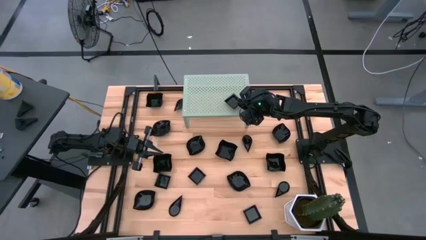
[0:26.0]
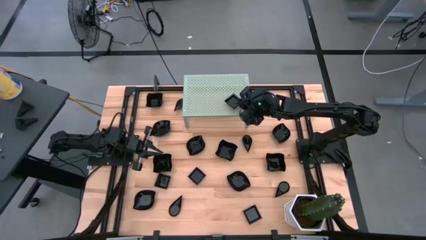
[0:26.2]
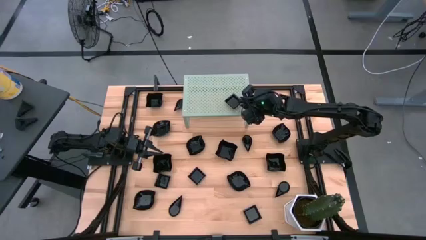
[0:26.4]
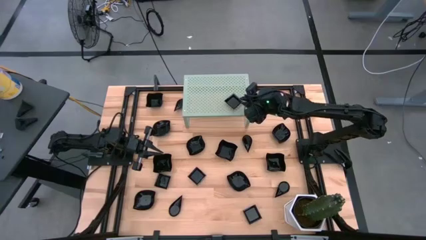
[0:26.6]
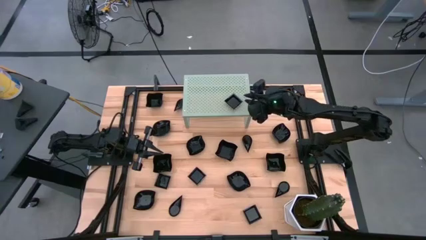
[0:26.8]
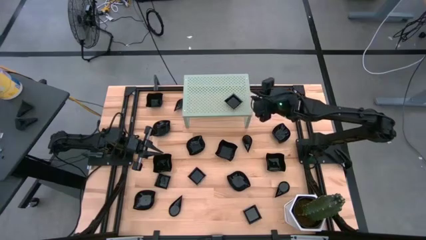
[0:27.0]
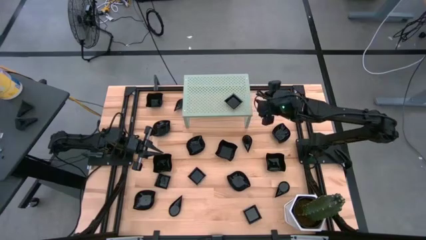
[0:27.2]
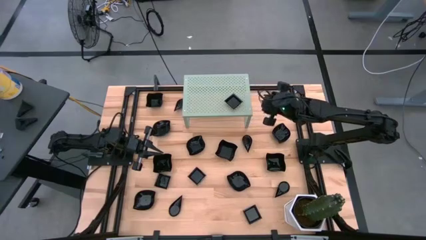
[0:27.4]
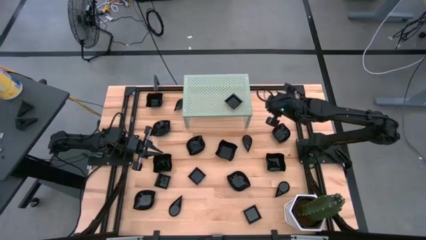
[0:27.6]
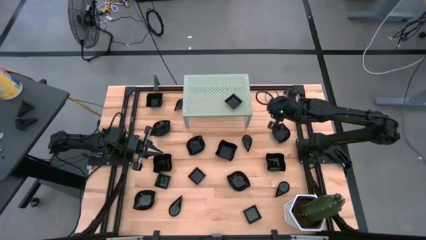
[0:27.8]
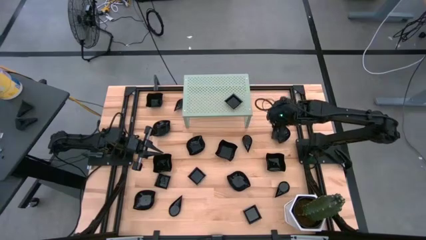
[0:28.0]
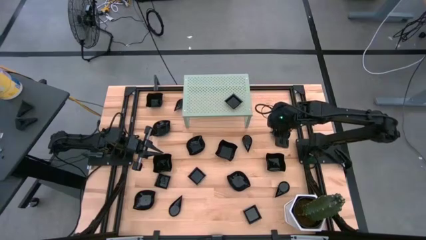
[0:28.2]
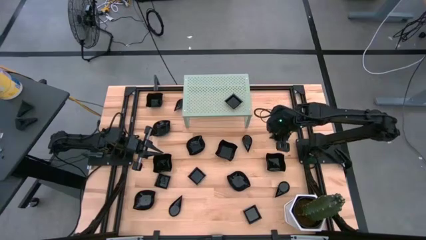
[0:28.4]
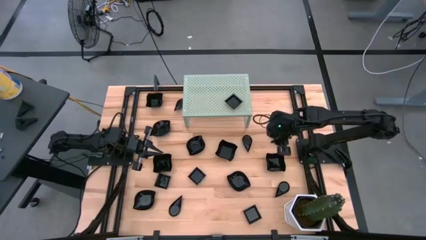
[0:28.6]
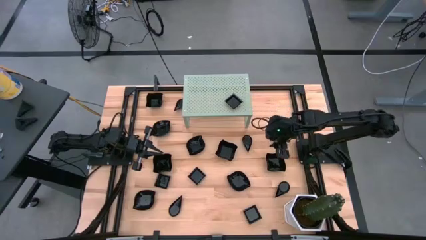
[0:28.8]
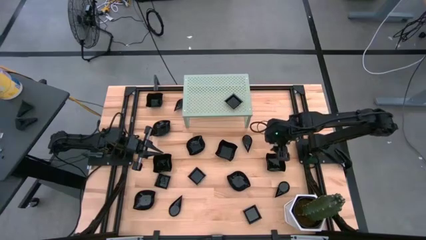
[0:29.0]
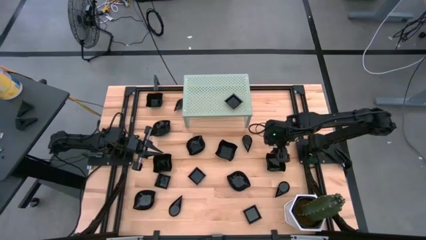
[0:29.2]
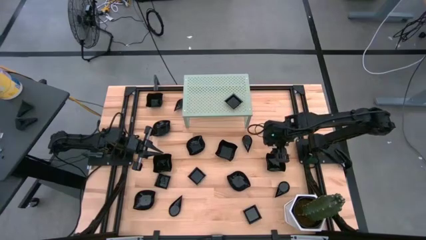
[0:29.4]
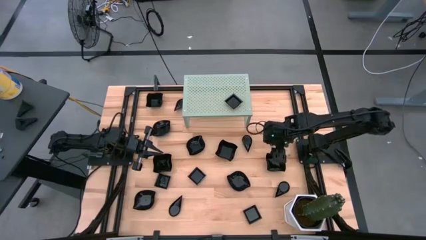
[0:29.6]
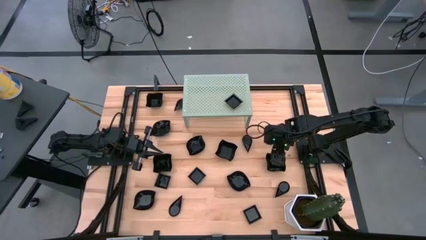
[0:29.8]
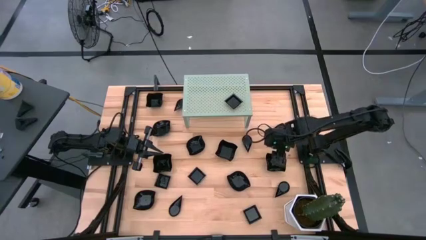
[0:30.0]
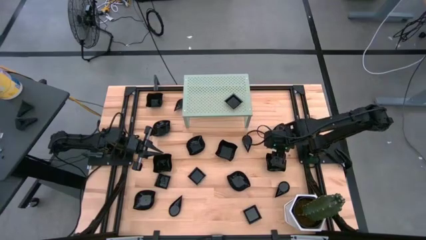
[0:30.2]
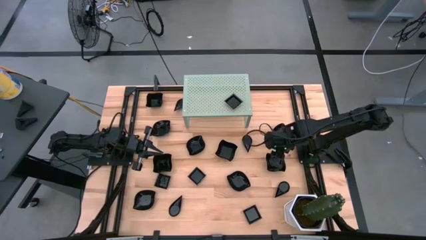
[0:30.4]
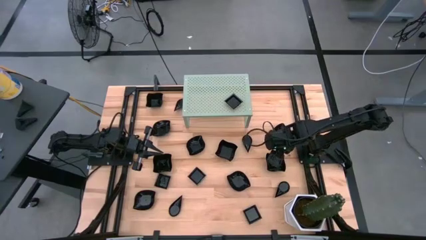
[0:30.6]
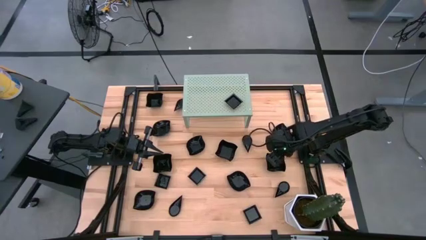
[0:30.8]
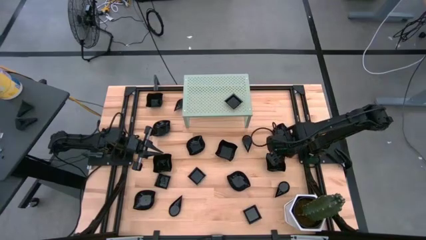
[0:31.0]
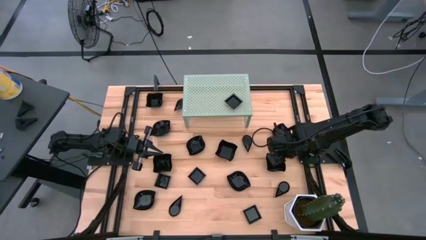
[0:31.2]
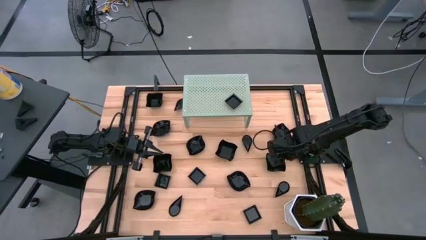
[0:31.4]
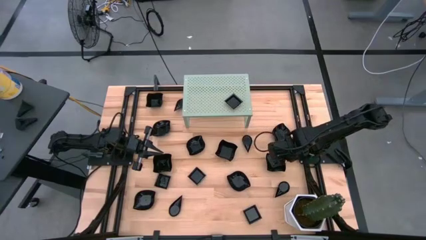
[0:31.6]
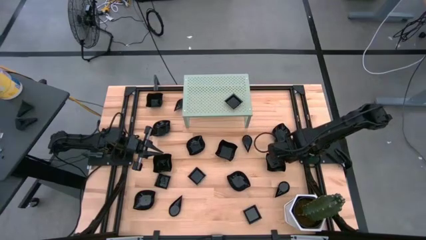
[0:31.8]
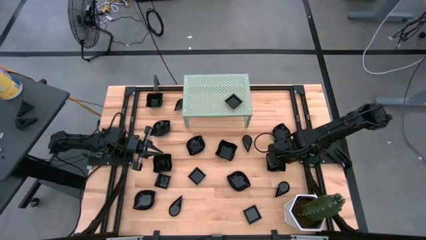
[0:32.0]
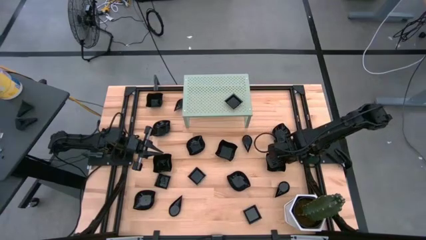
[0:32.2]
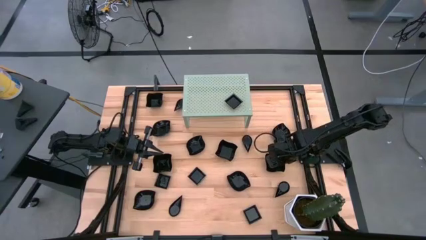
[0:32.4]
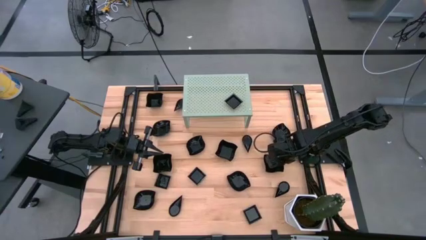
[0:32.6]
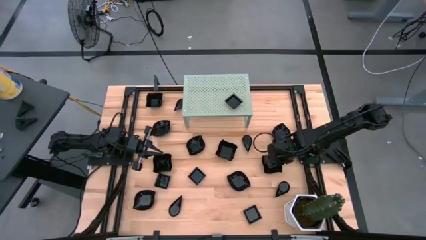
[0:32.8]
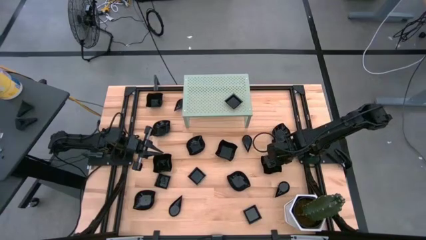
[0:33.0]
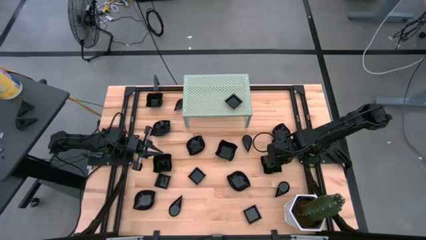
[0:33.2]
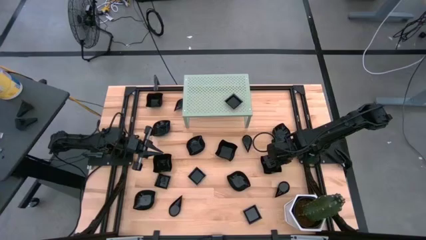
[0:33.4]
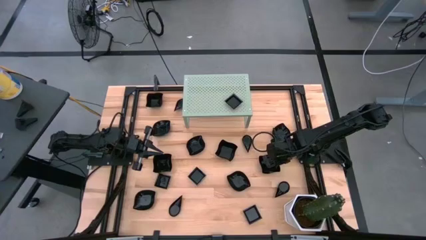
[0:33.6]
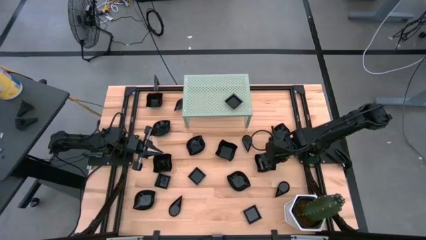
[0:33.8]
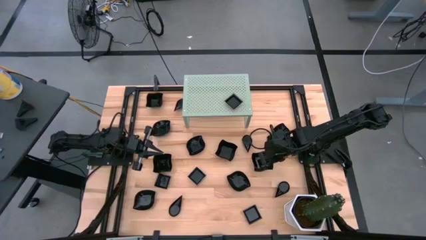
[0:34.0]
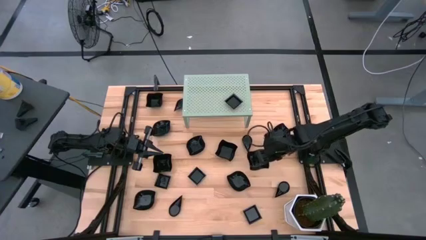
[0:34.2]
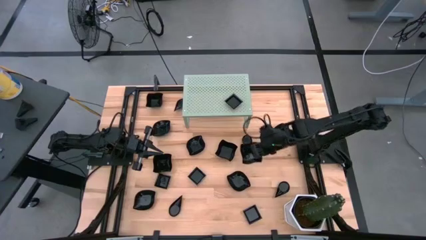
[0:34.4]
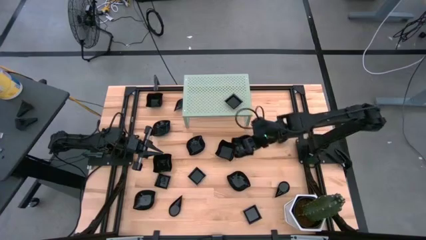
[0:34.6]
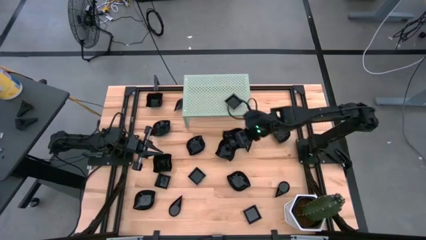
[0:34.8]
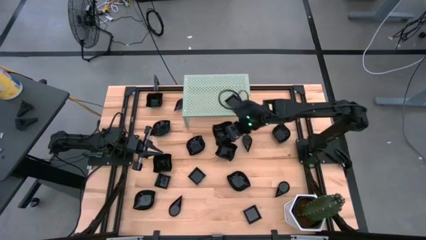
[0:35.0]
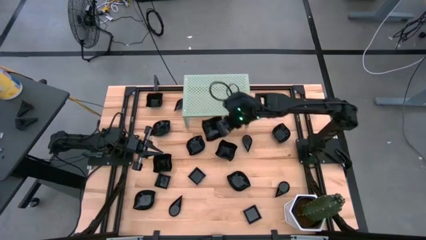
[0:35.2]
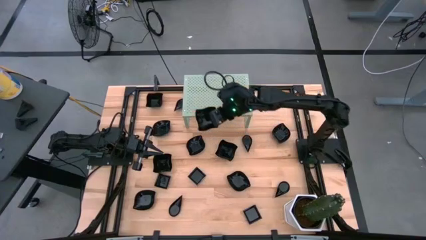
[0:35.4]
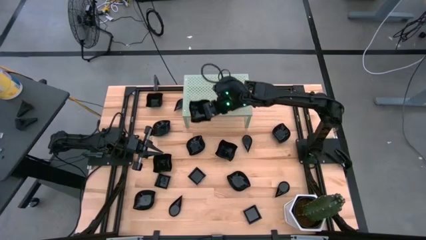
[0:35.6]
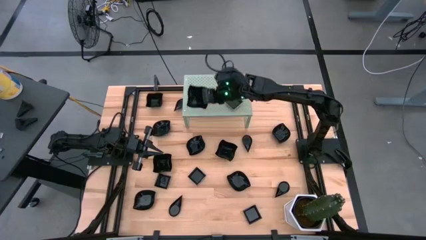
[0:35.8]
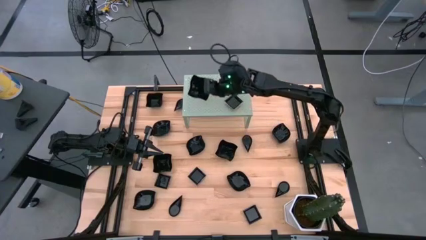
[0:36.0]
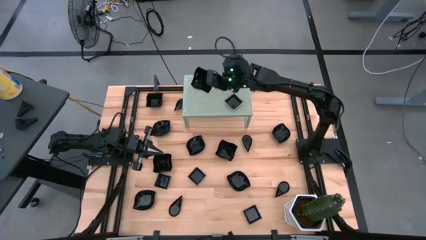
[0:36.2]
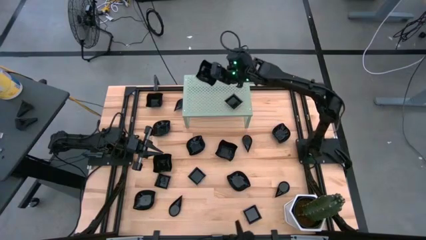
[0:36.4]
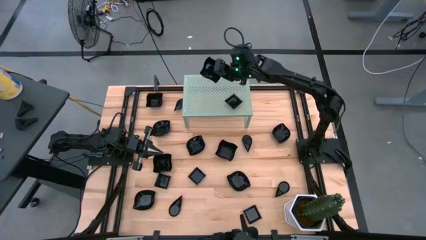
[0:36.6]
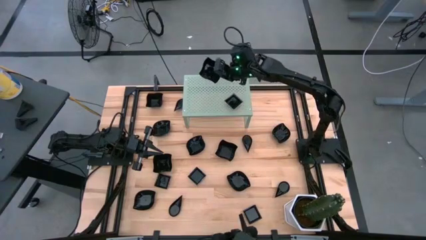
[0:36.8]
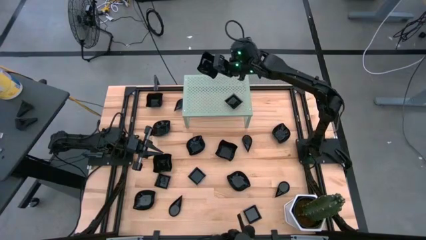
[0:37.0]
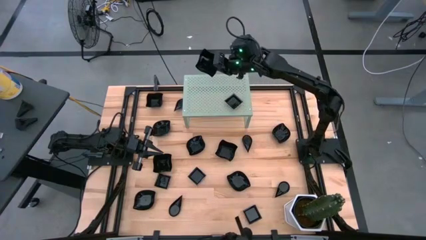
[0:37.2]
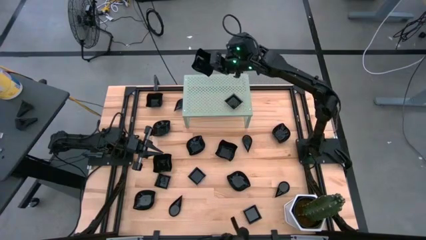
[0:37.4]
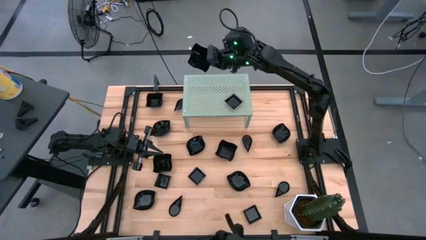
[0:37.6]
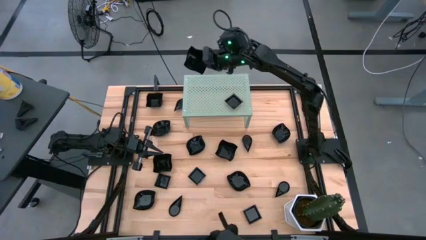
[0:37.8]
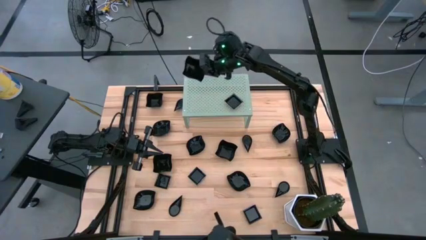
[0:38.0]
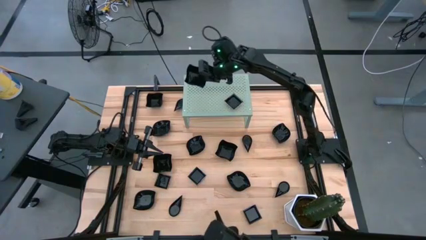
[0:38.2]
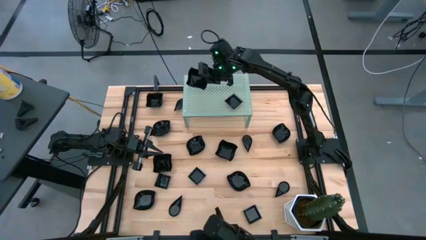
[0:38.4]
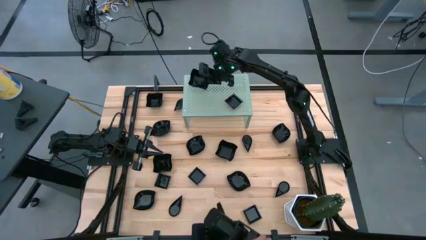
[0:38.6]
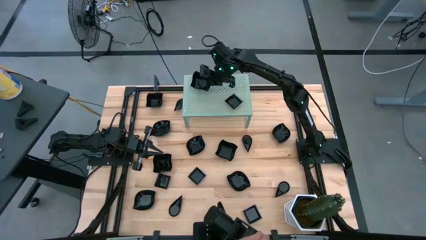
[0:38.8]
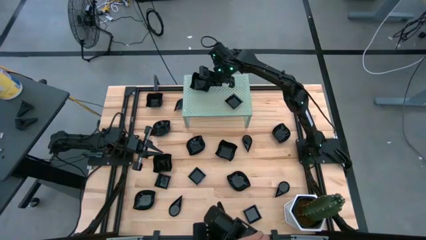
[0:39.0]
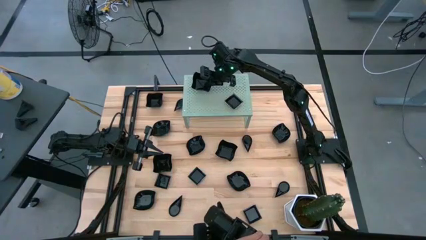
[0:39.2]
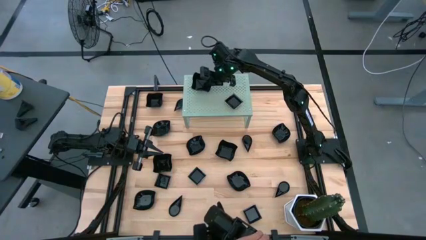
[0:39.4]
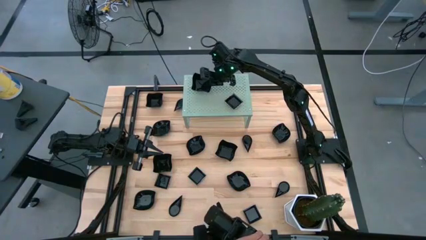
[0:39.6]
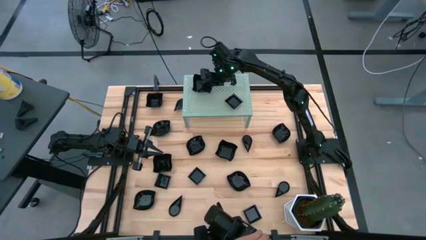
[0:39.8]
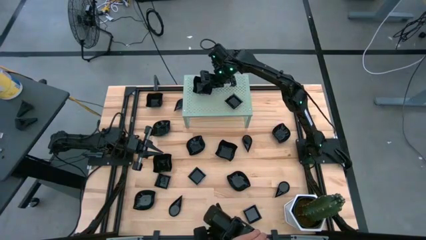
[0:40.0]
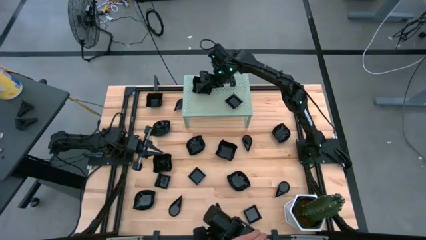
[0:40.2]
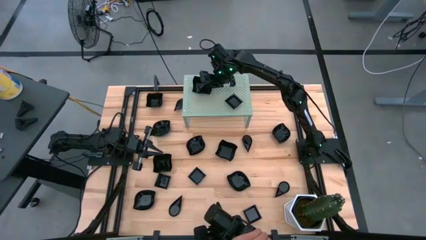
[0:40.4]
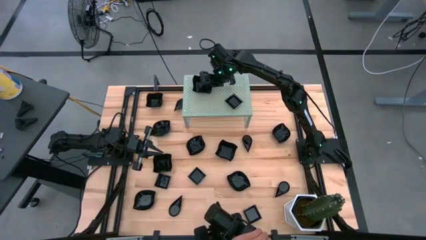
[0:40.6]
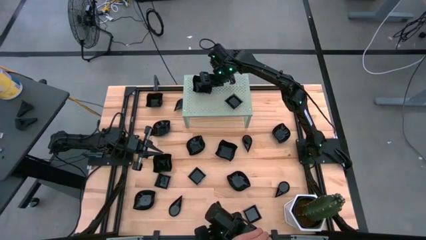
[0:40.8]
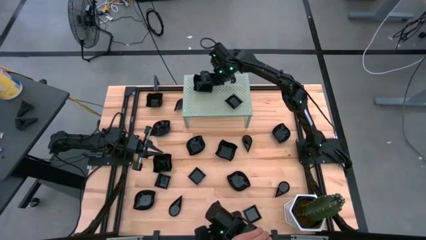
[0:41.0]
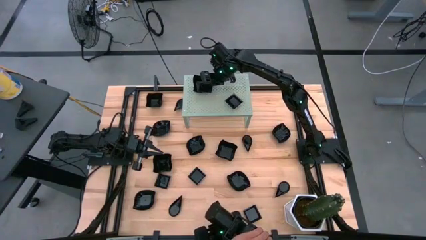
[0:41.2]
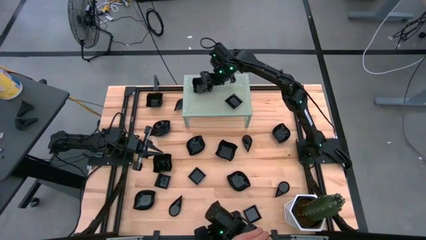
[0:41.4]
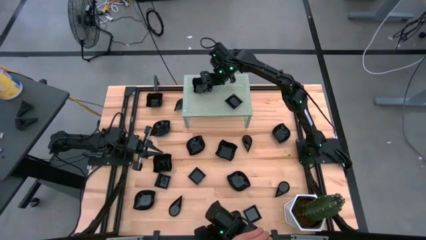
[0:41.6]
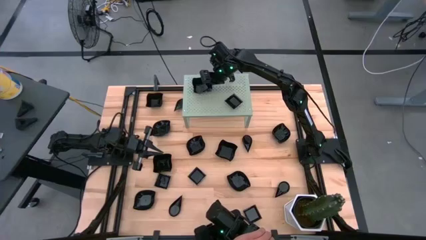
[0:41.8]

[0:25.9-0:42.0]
Task: Pick & Place Mini shaped plates
Put the distorted square plate on the shelf
